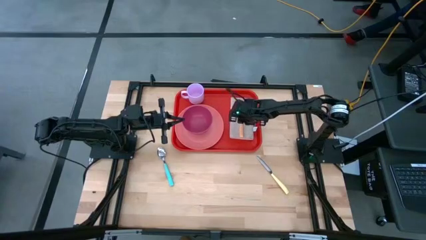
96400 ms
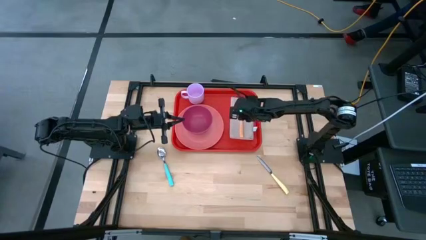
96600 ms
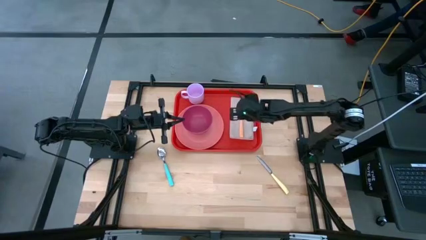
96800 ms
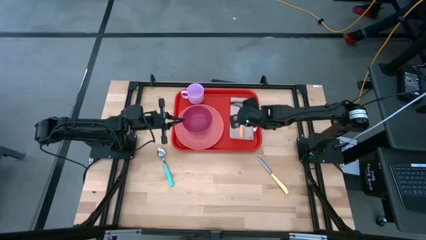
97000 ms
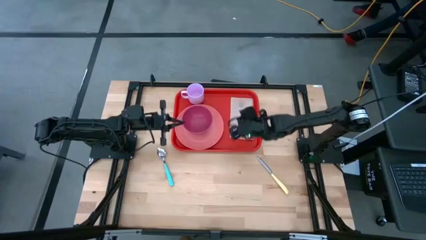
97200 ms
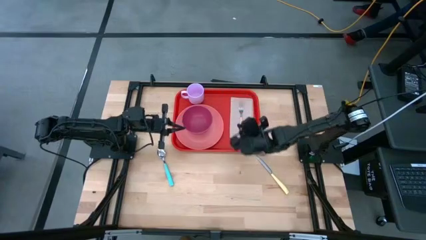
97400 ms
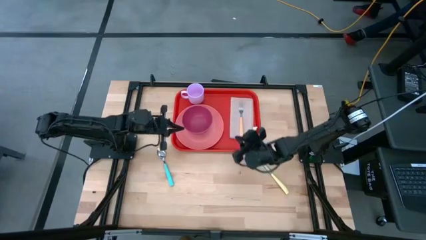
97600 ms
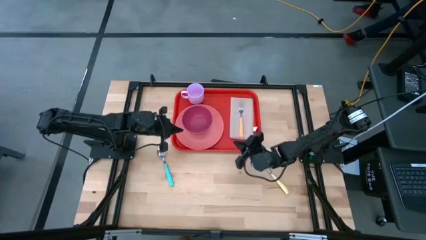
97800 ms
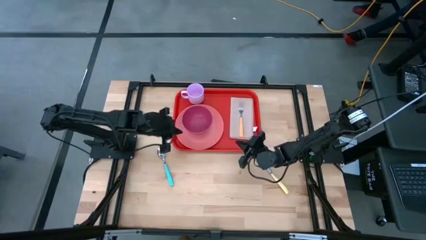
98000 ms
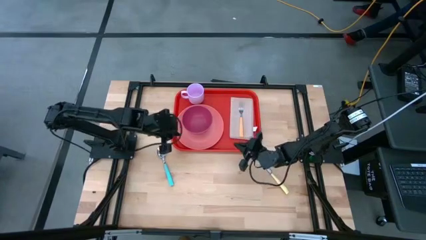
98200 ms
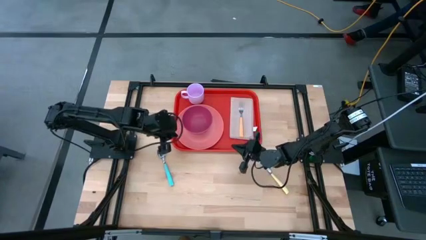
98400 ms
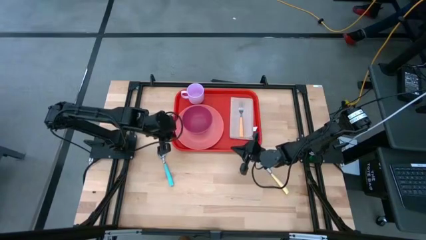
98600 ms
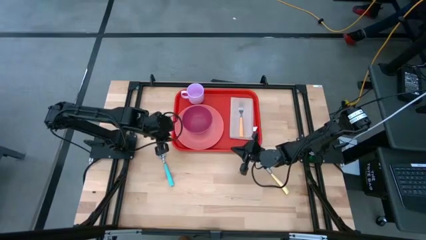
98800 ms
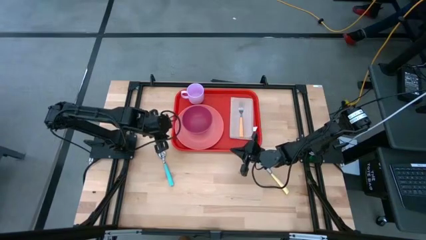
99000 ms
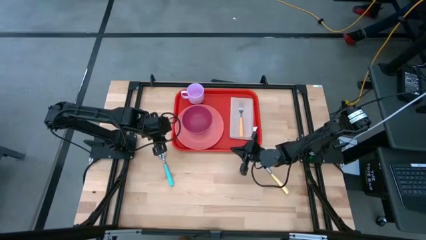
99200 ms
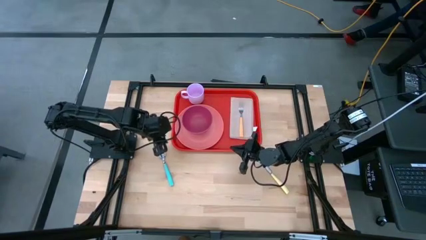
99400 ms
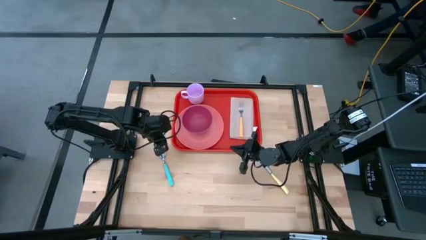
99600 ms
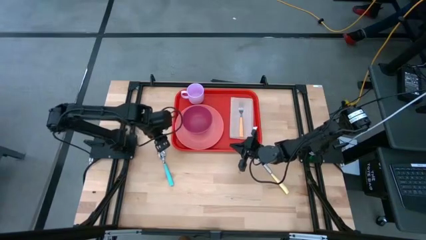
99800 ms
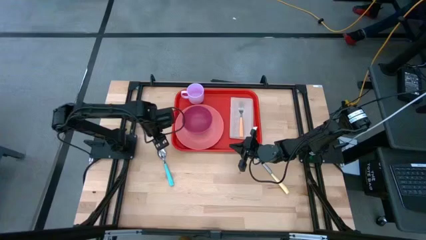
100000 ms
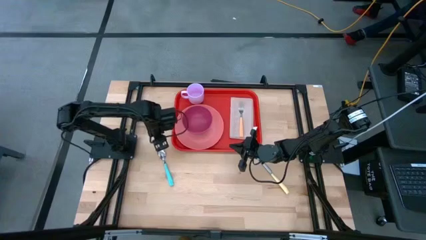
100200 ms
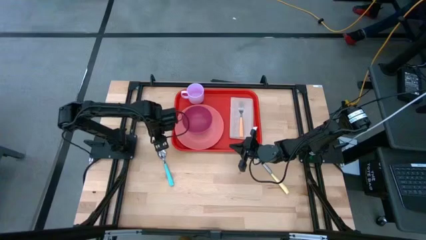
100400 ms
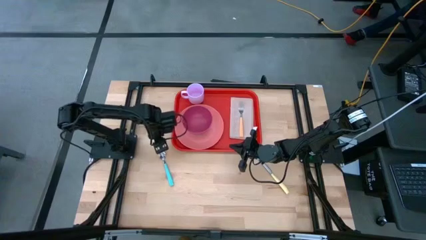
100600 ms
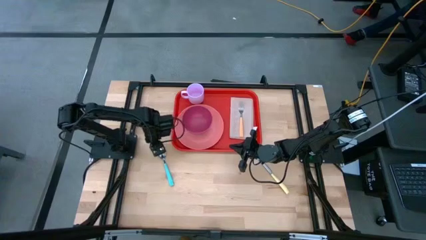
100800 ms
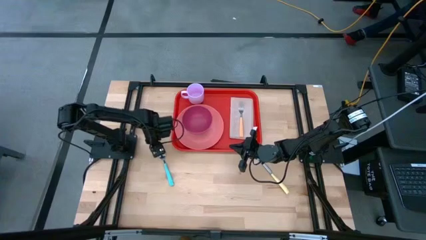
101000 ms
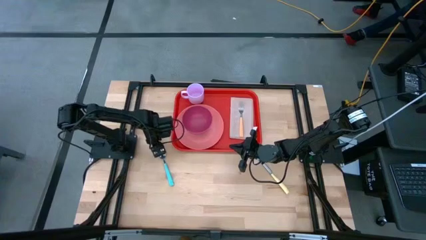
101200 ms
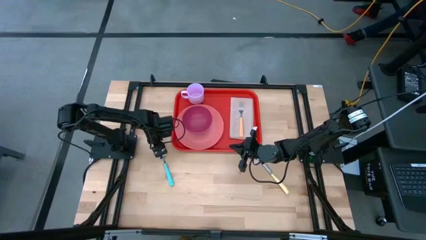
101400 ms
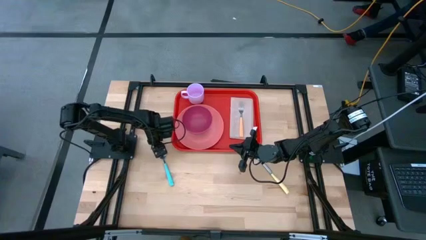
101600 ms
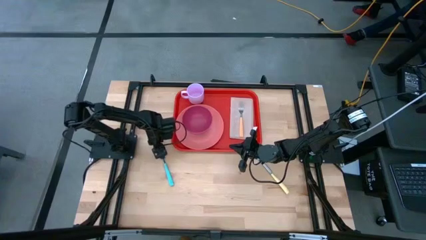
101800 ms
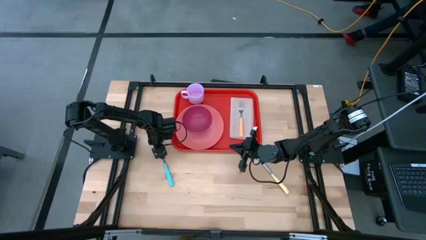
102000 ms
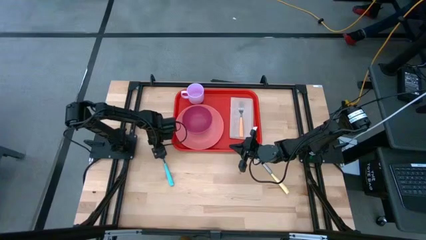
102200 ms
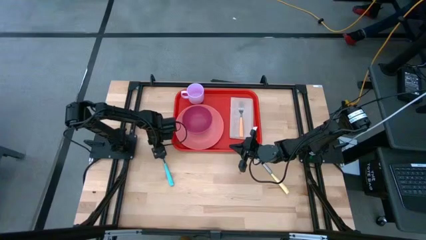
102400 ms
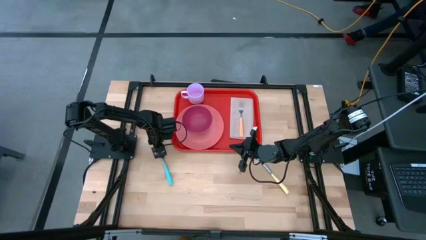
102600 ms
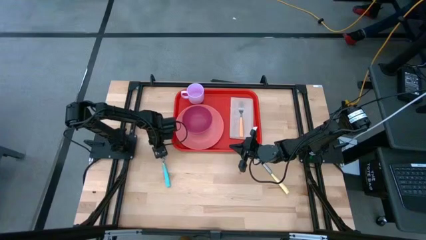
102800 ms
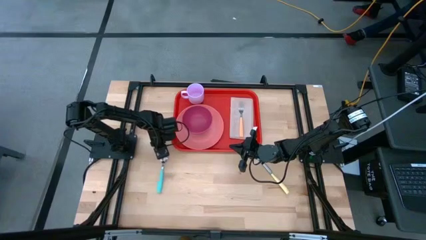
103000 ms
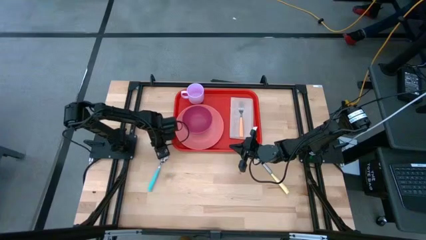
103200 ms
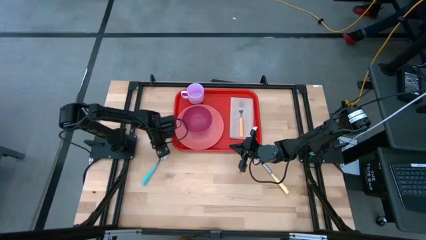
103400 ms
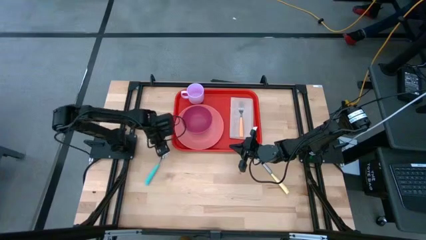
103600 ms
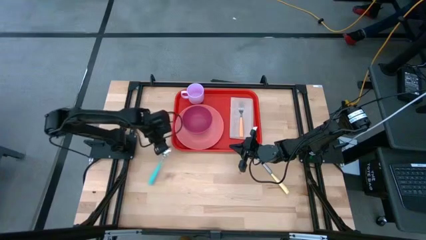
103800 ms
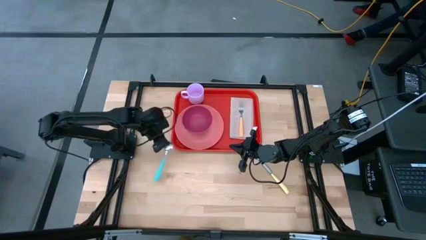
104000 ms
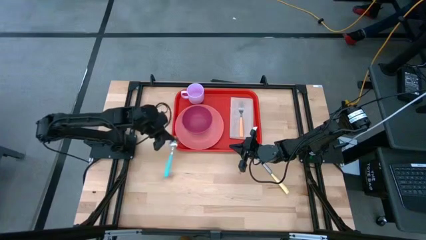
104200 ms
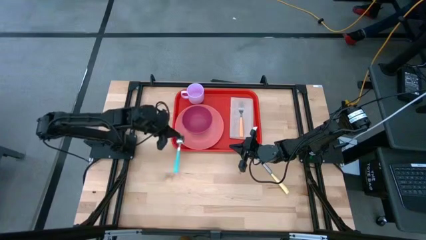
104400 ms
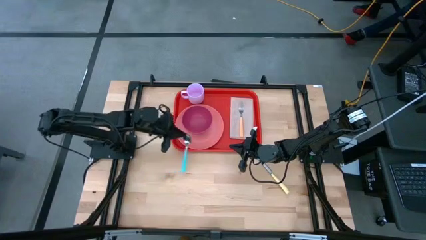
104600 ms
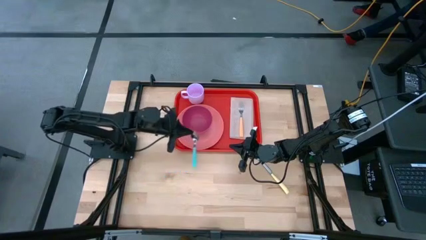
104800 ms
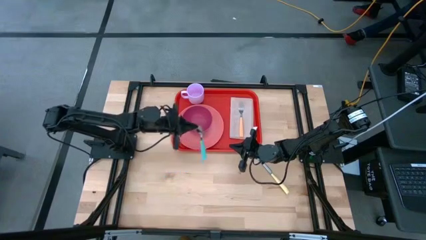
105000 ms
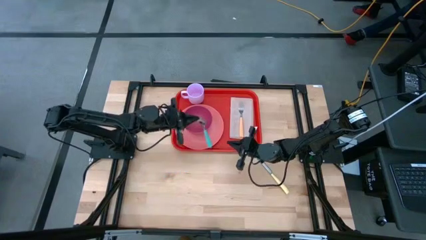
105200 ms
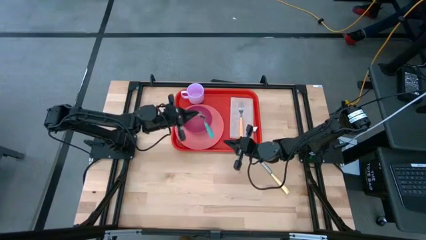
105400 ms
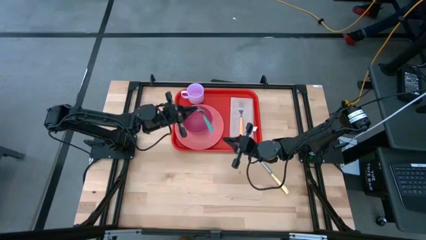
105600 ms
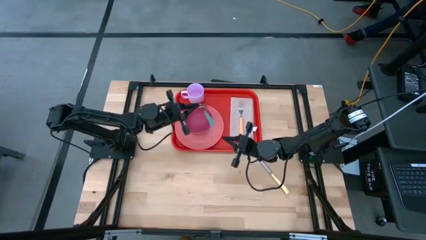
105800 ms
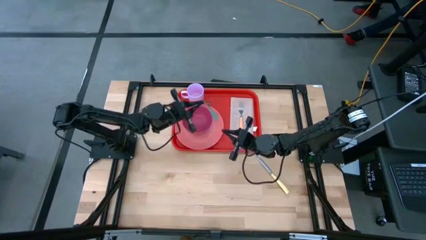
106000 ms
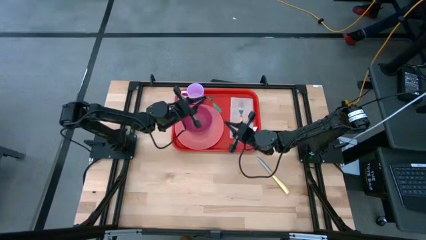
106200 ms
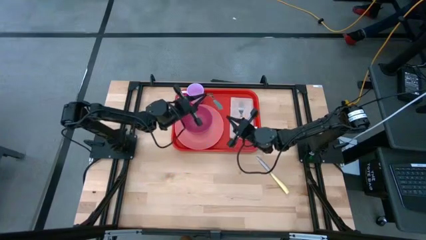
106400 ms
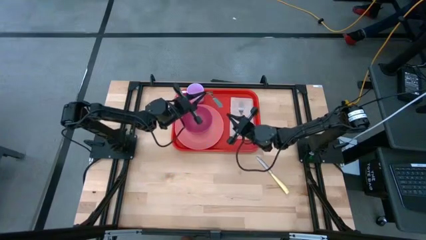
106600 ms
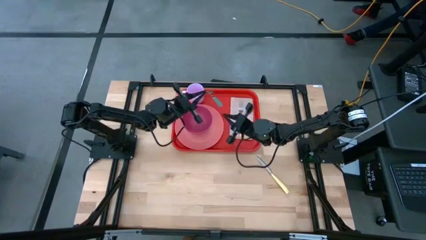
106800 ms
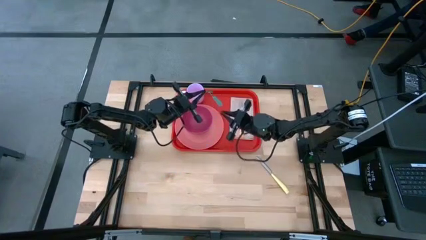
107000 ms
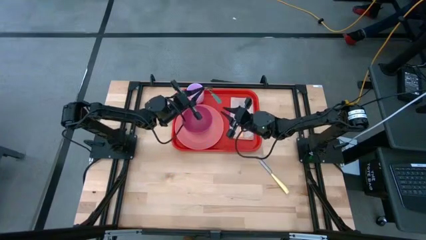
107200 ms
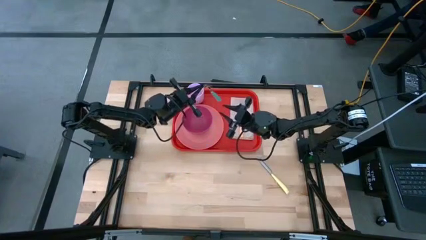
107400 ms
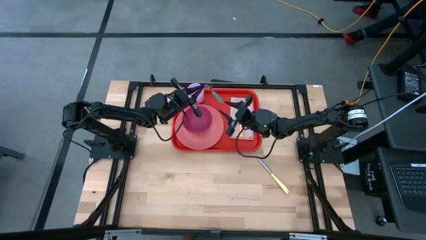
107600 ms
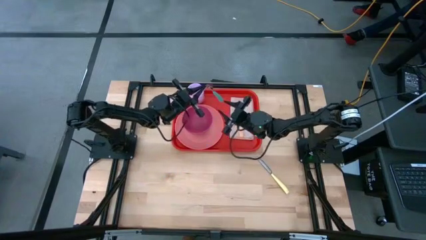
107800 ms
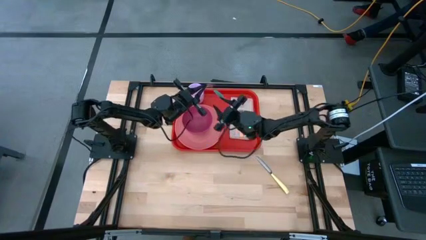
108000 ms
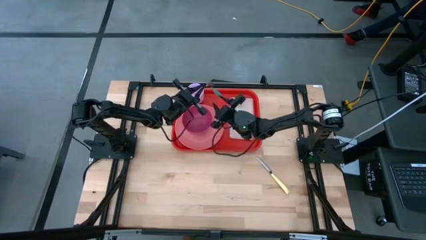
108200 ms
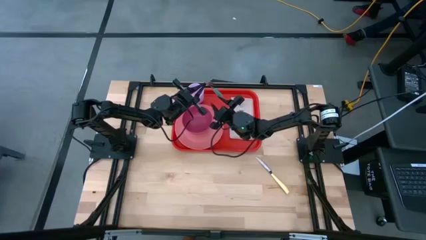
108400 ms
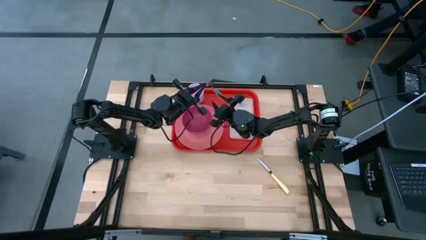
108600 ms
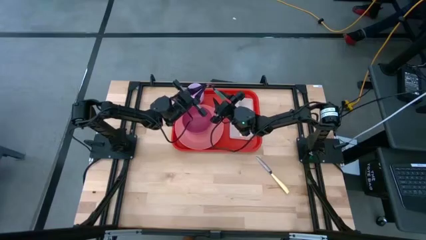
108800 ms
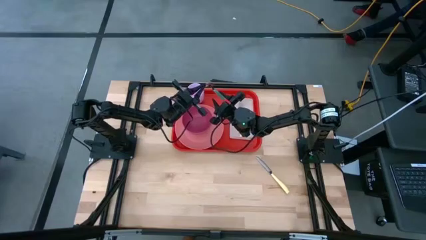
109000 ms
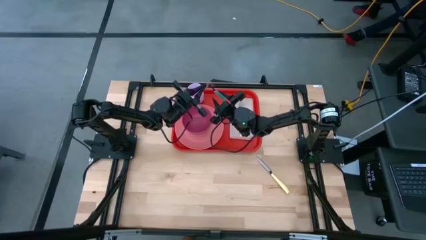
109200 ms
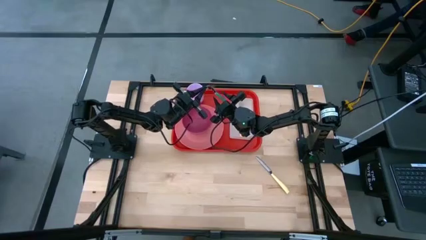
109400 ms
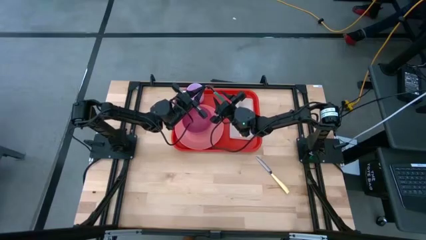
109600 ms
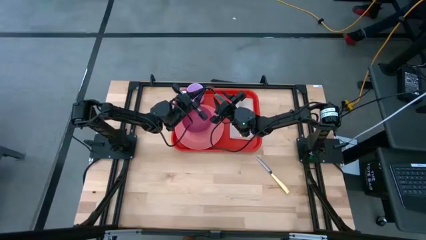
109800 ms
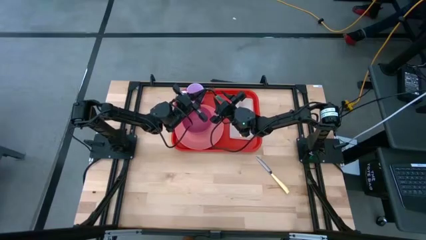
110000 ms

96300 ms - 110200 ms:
Task: Set up tray
Put the blue spoon beside the orange fork on the brown napkin

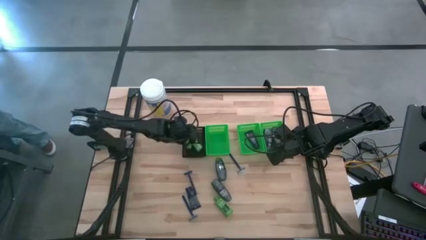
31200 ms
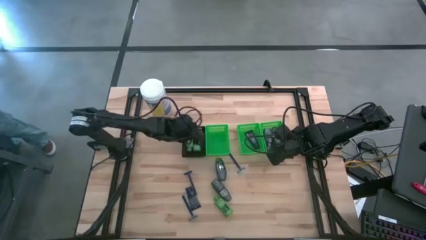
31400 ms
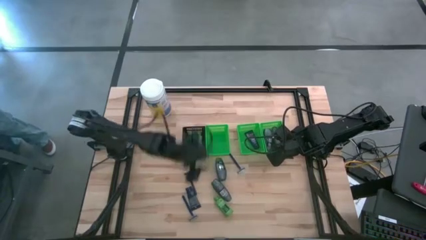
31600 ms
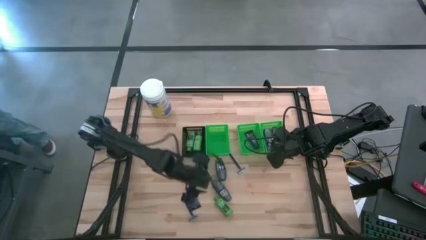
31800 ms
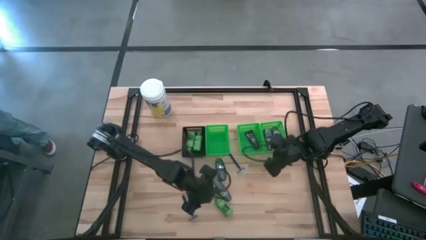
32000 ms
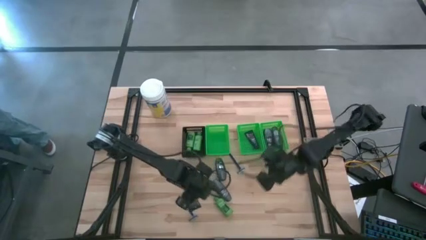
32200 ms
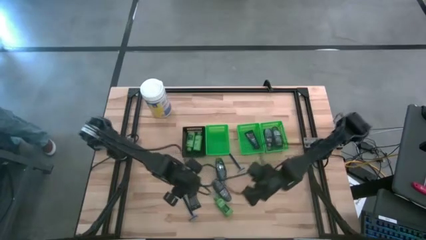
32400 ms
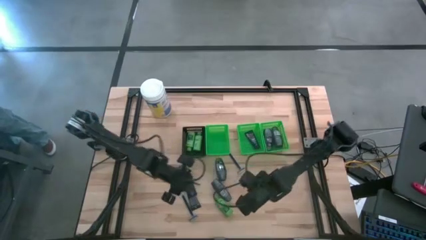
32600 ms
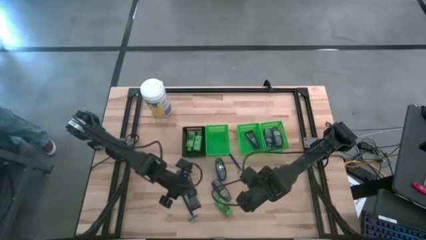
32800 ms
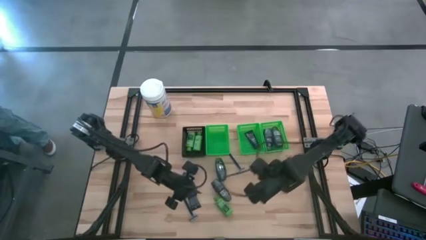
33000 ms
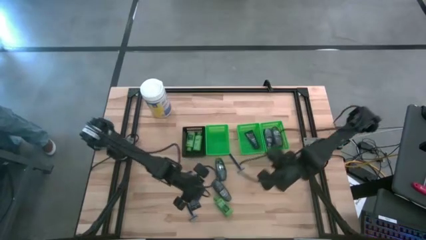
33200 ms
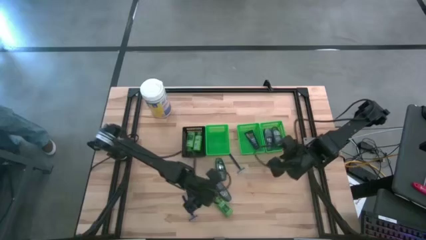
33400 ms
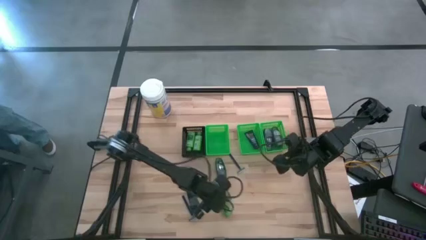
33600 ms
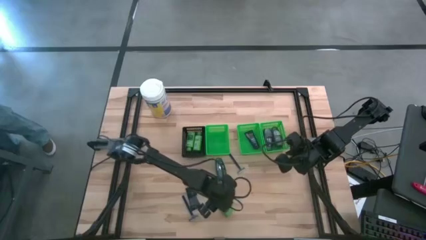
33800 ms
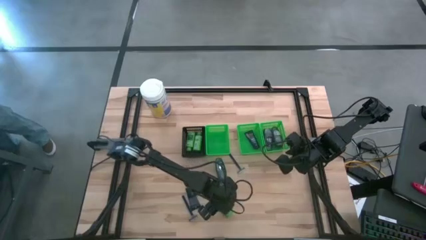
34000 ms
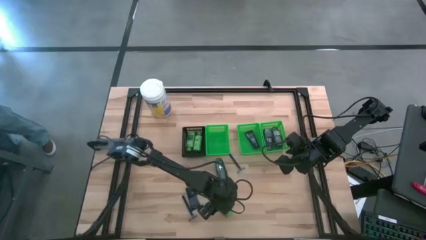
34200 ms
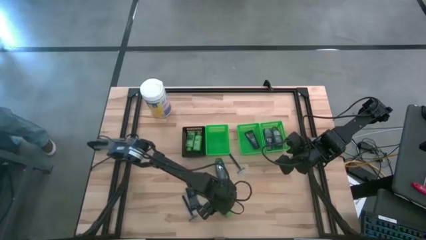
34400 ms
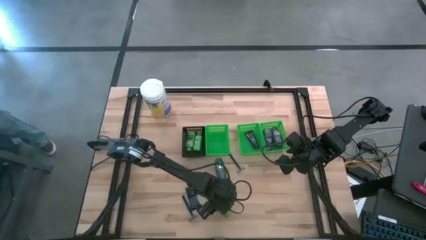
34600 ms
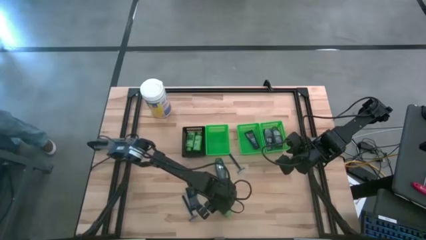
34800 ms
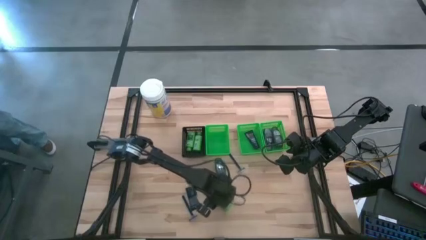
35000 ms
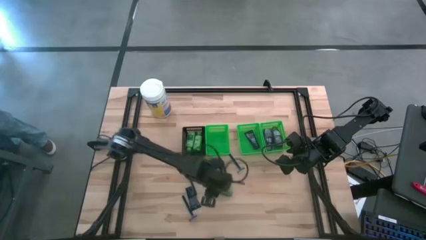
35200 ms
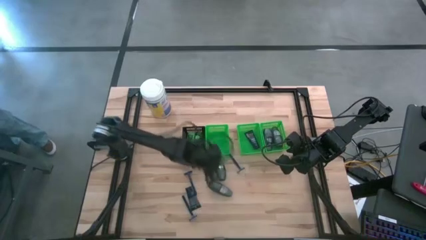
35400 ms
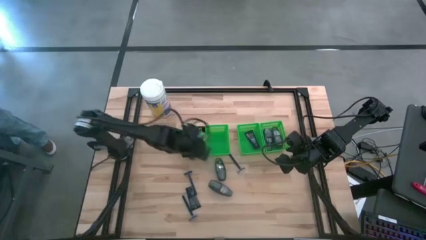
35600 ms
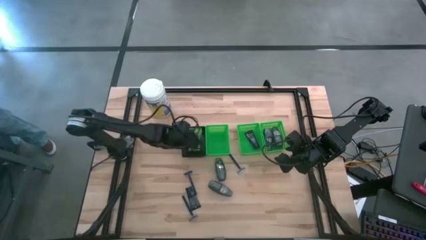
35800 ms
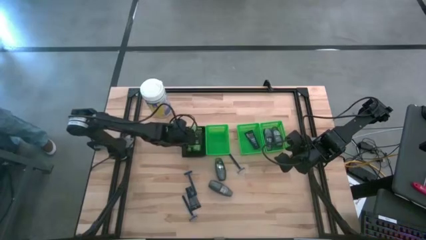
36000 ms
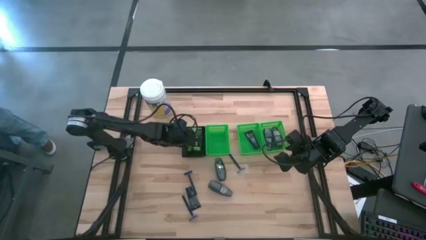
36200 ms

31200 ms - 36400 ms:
Task: Pick & Place Travel size toiletries
Put the green shampoo into the black bin
